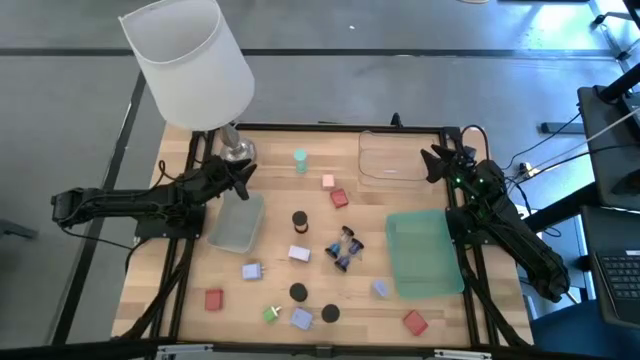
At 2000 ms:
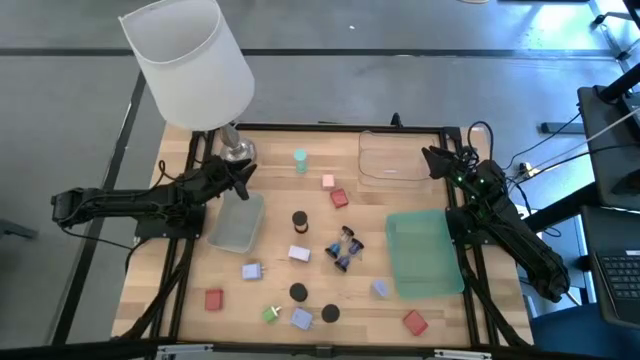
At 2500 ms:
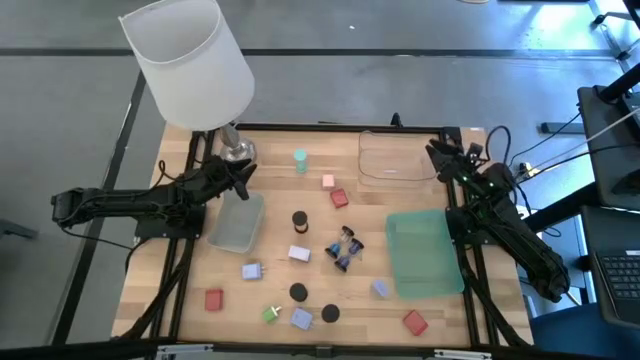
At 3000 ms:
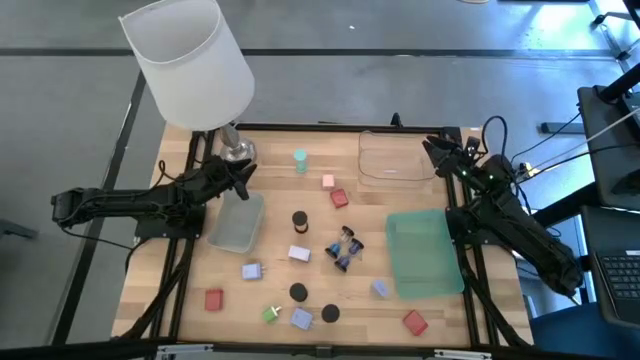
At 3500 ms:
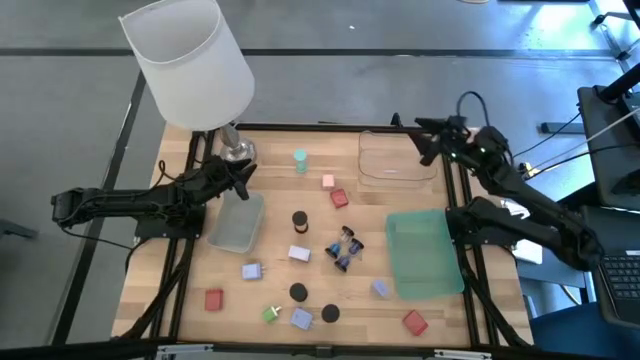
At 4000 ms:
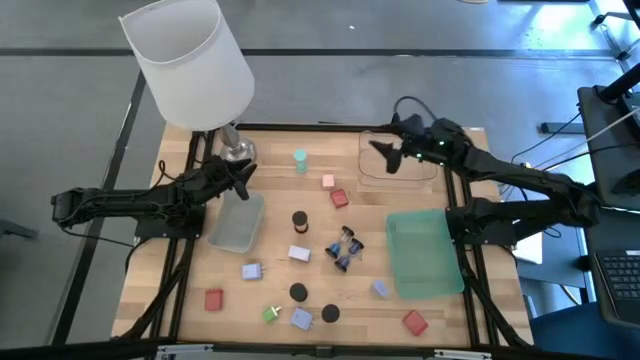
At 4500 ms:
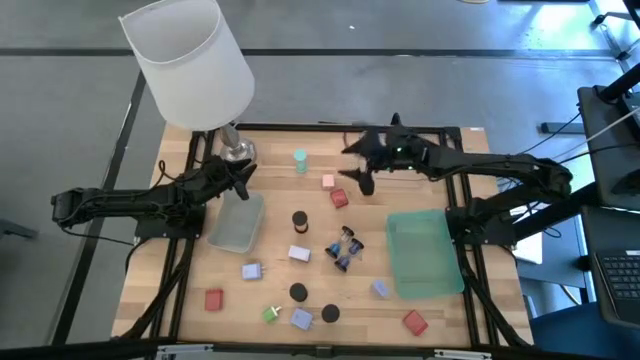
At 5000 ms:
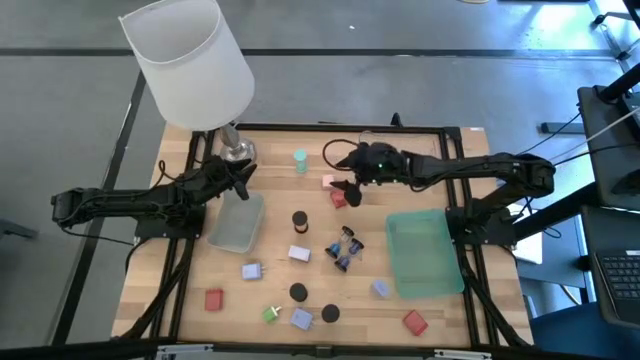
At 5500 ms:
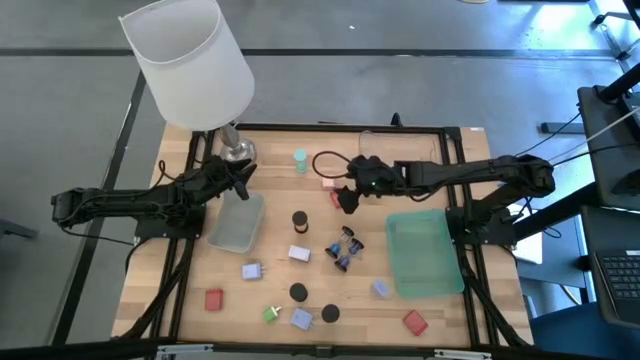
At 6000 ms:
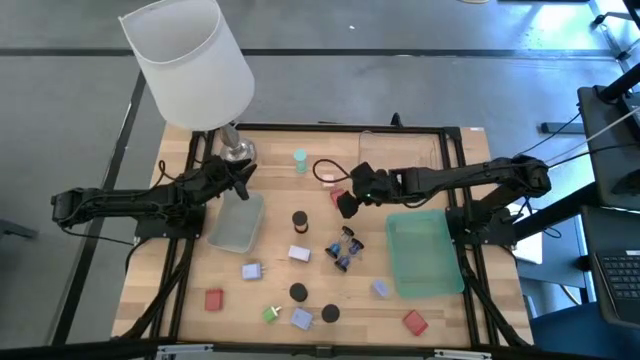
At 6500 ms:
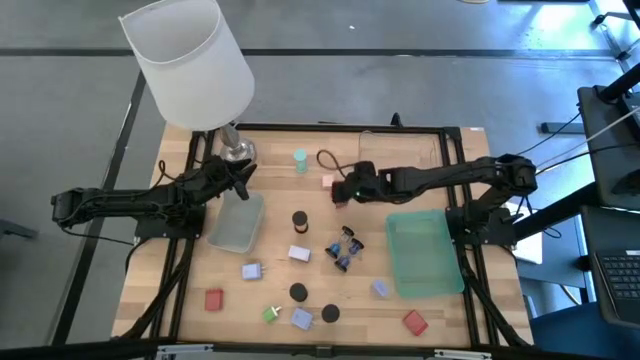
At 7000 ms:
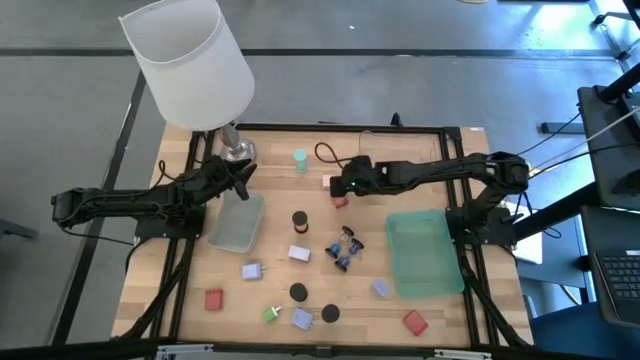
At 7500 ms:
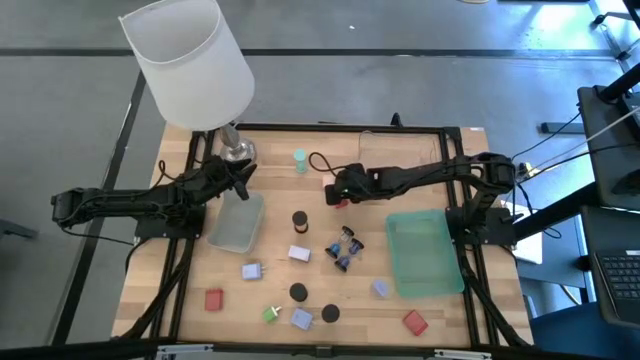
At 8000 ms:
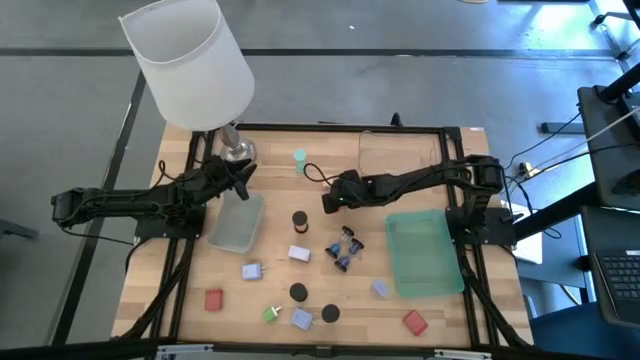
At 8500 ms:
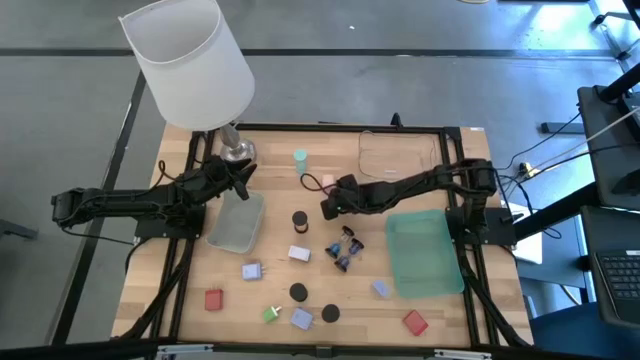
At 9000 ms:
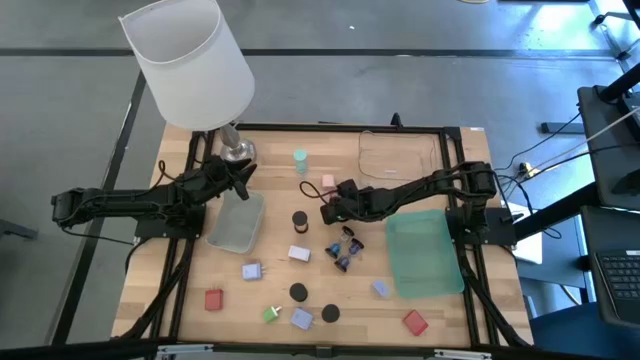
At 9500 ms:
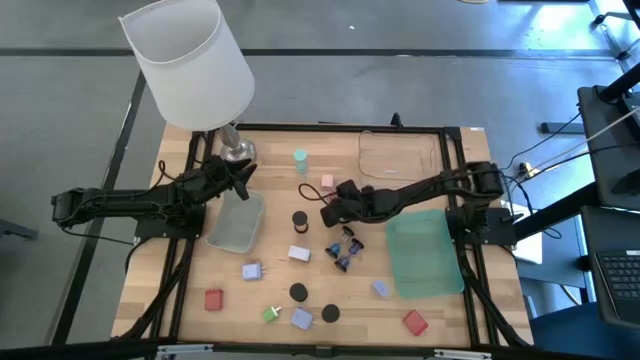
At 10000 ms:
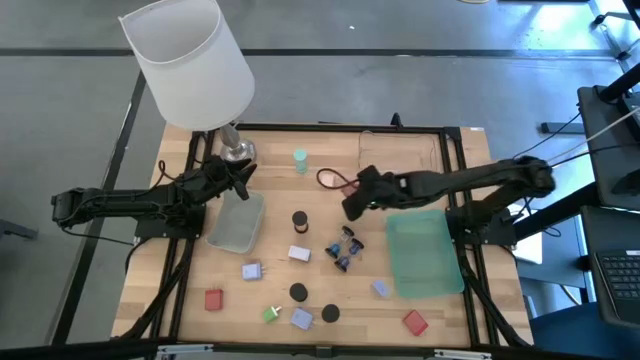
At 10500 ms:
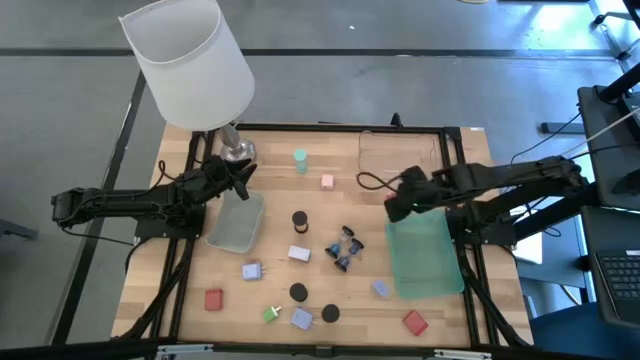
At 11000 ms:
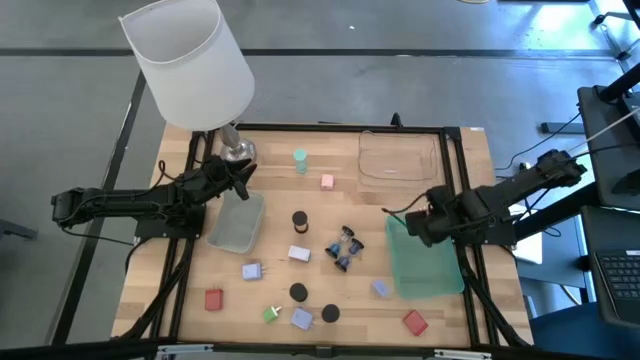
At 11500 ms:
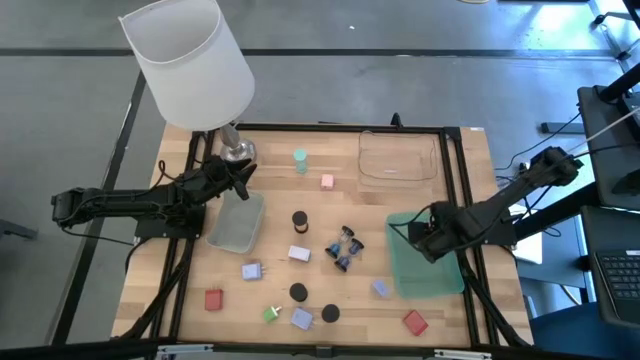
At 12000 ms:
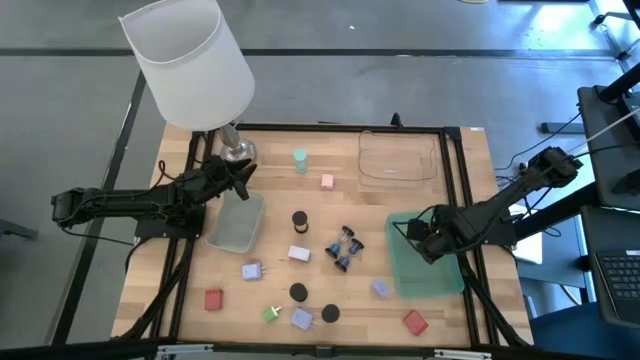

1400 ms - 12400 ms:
Task: Pick & Place Office items
Put the middle red charger adapter into the green bin

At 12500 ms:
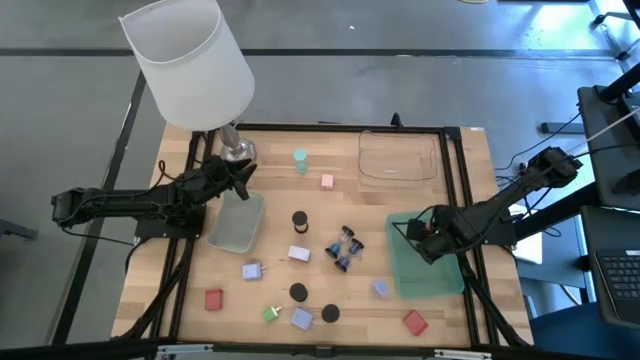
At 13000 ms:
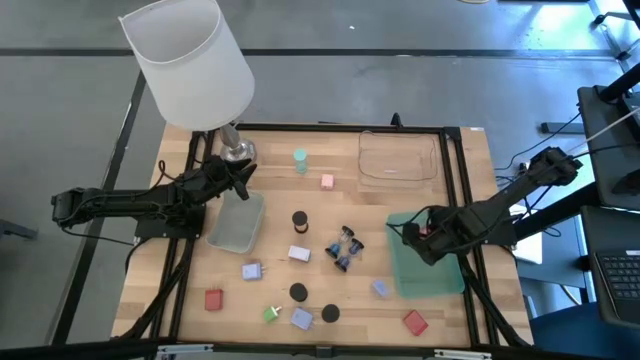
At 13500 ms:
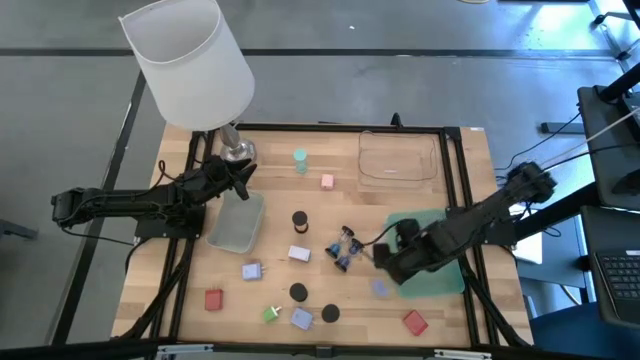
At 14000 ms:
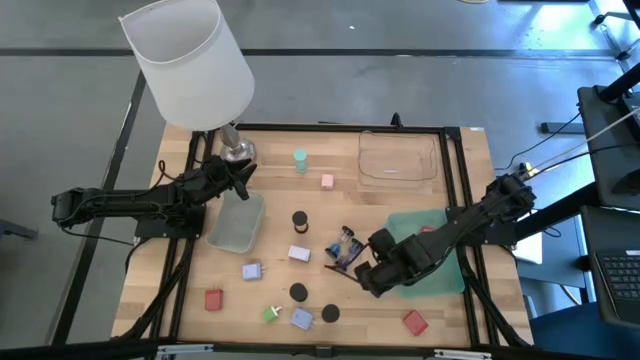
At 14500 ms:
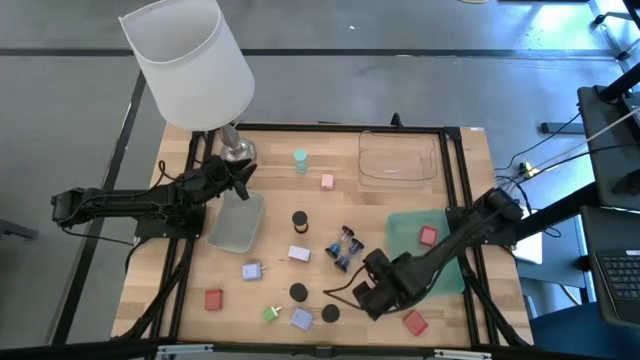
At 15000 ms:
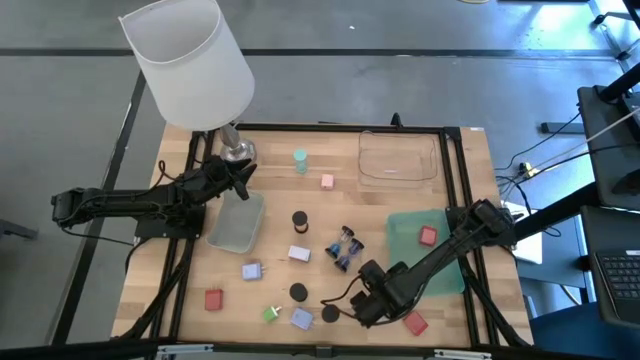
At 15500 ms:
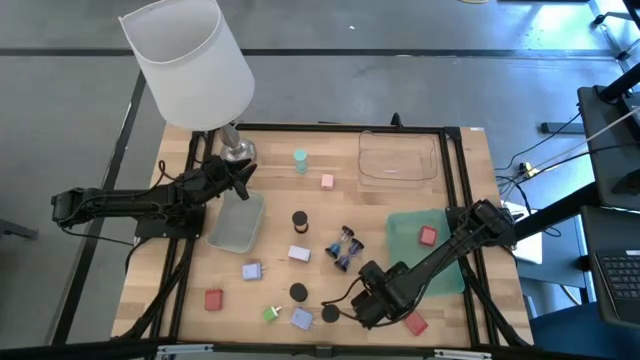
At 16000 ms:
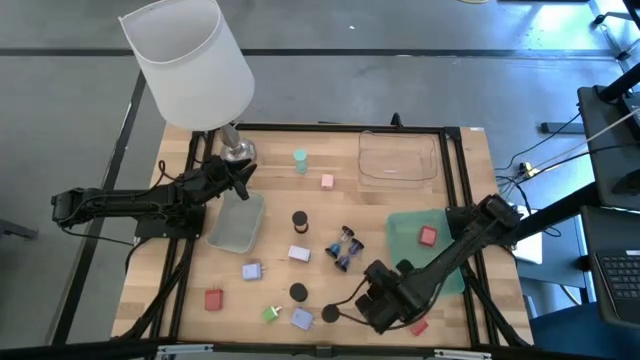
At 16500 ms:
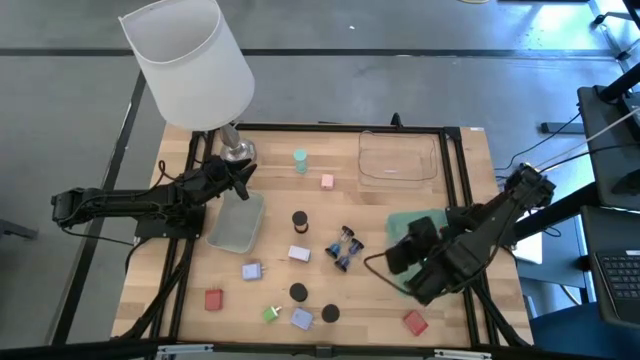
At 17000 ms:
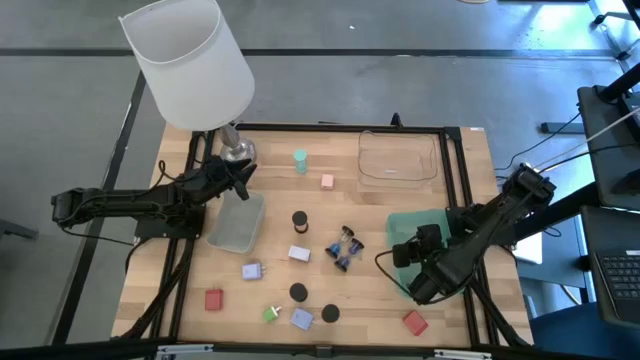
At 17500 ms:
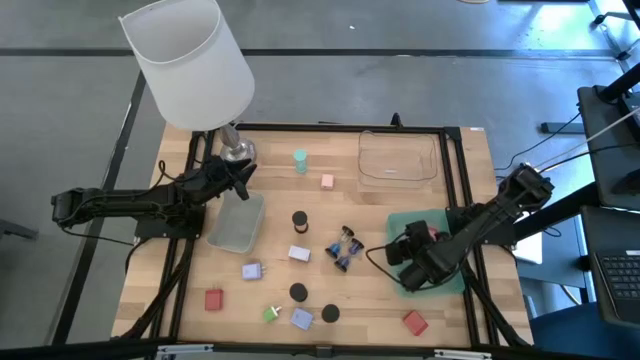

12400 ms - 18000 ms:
Put the right blue charger adapter into the green bin

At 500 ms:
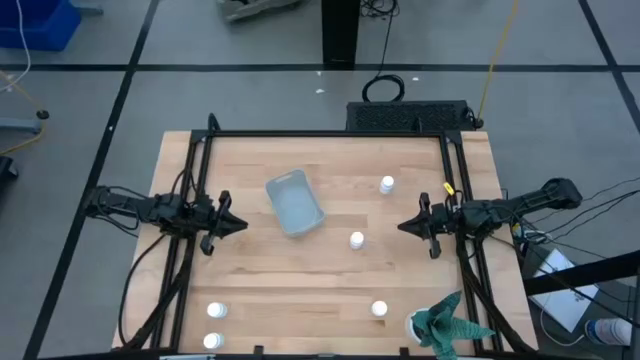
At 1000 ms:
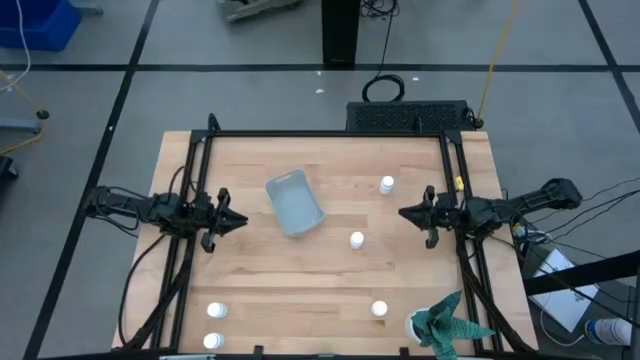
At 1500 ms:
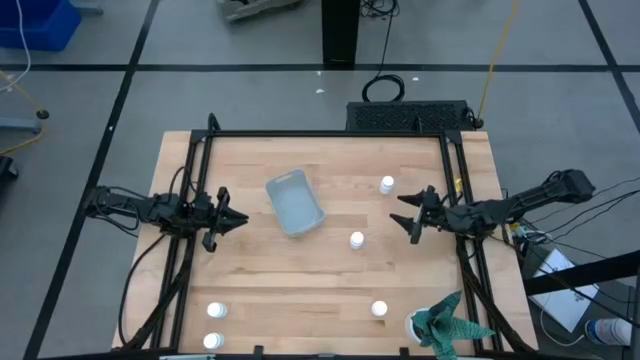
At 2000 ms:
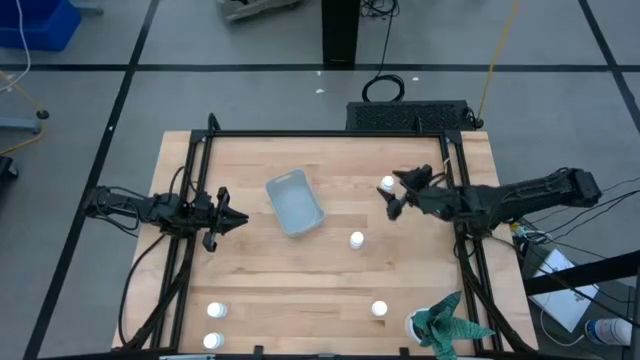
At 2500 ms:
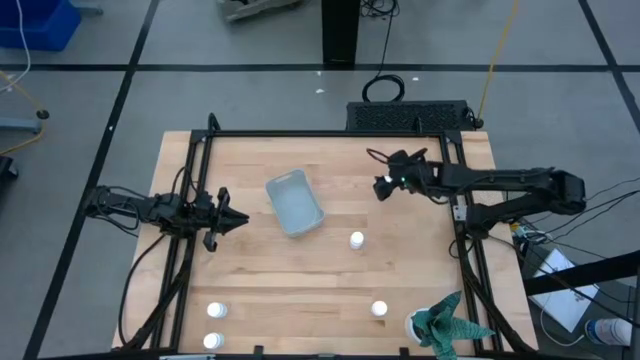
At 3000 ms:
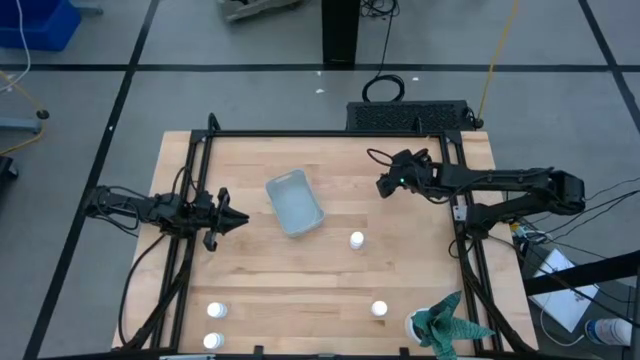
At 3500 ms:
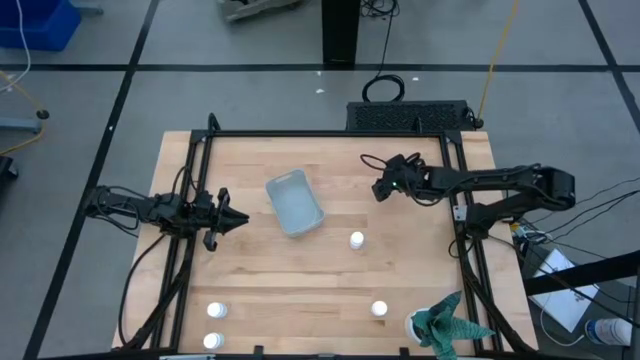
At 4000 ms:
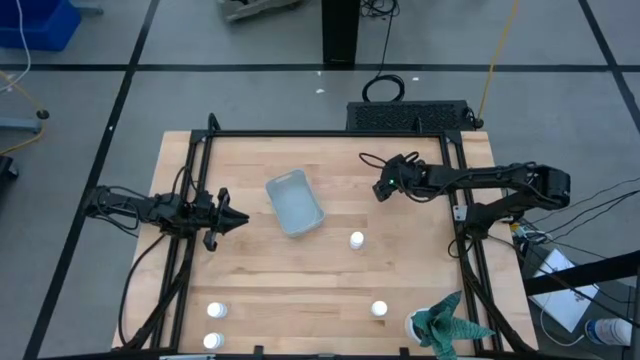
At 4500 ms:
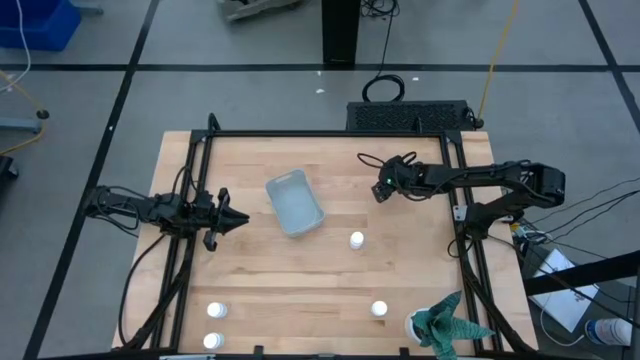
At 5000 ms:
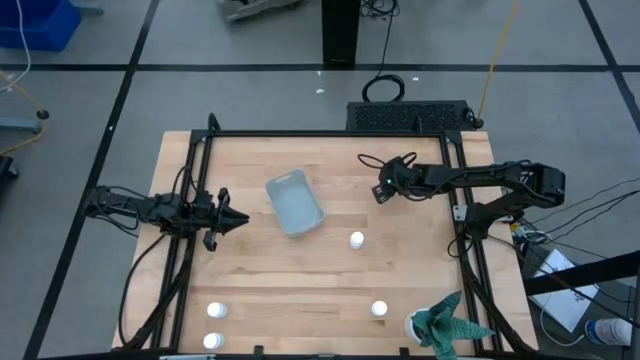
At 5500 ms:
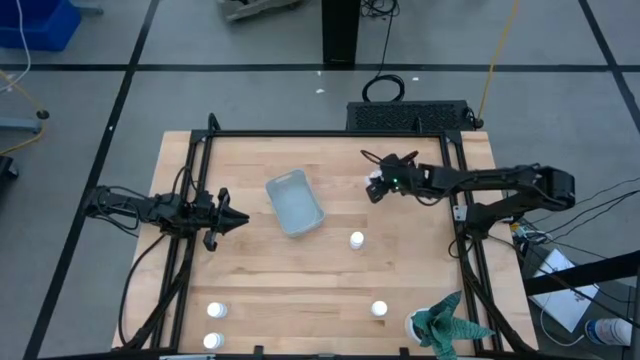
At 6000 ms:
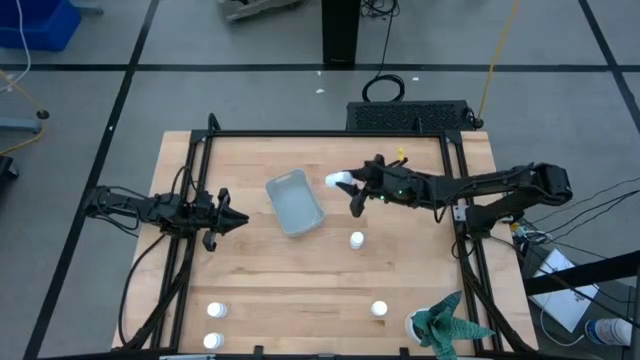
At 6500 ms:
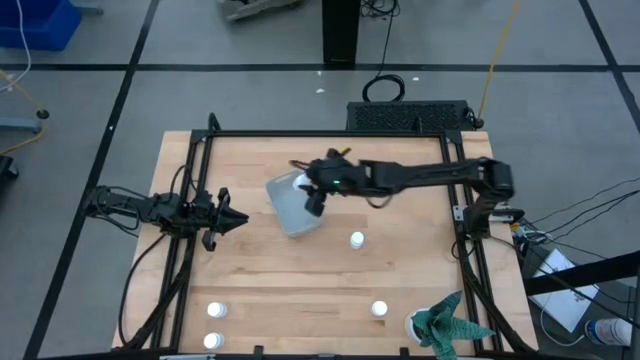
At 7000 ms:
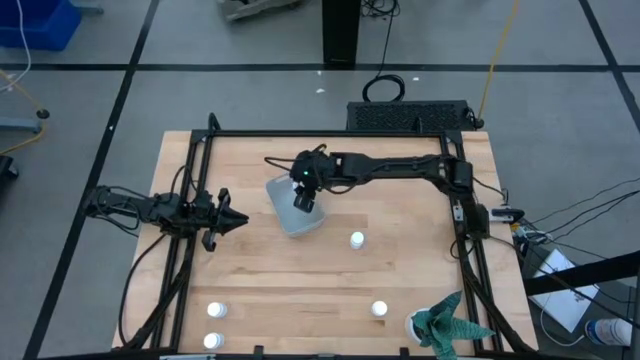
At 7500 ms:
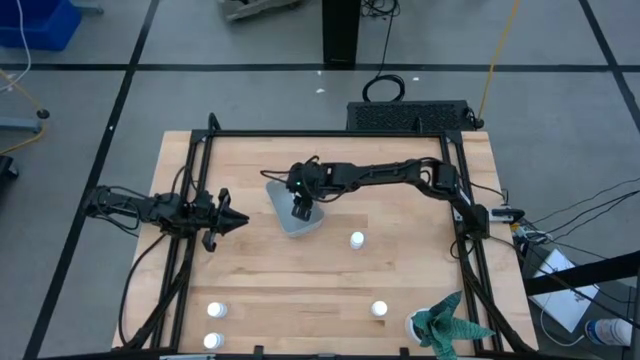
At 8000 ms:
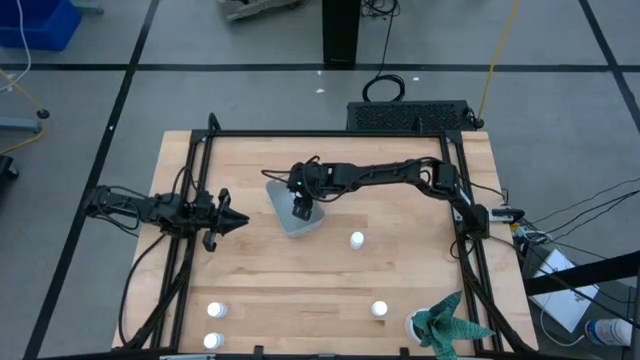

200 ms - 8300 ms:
Task: Pick and place pill bottles into a basket
Put the white pill bottle into the gray bin
